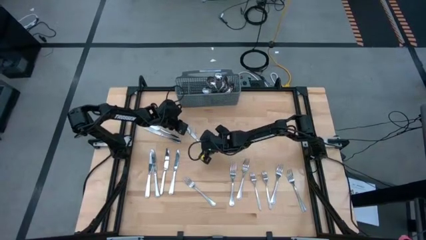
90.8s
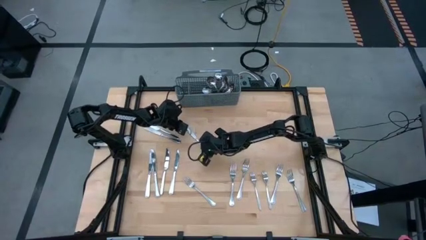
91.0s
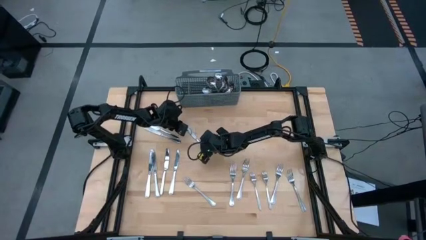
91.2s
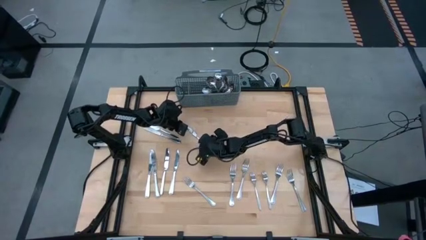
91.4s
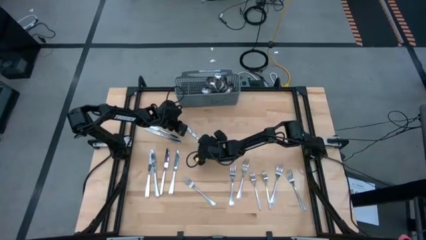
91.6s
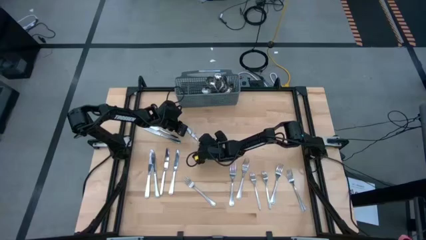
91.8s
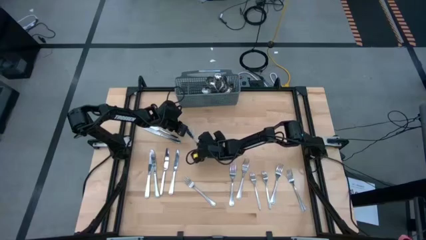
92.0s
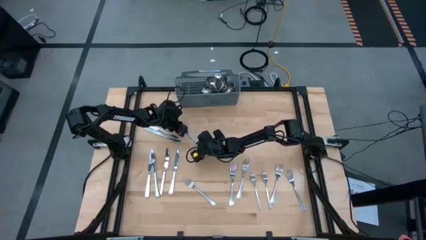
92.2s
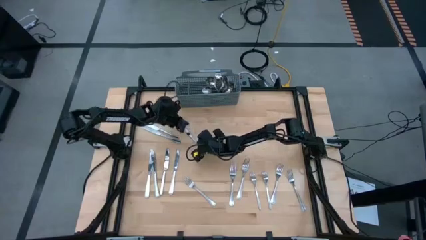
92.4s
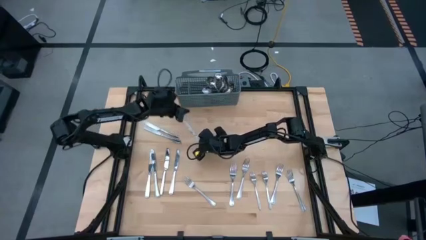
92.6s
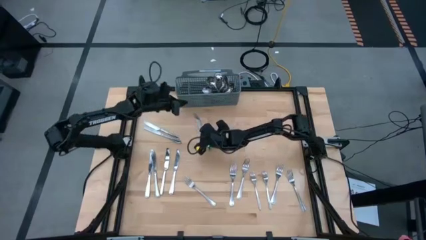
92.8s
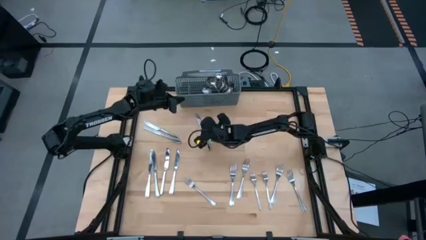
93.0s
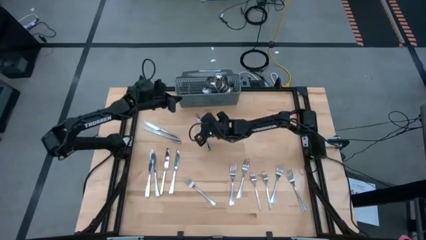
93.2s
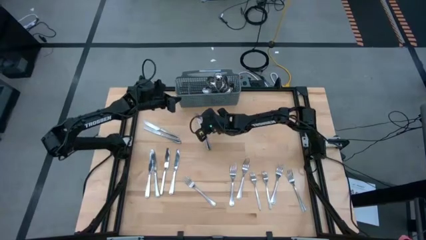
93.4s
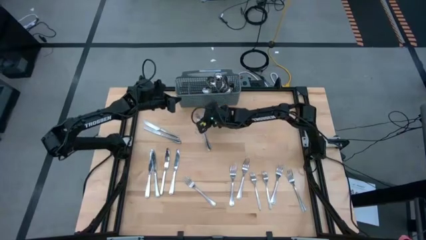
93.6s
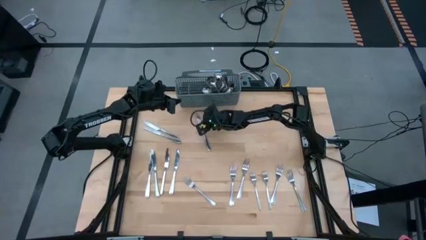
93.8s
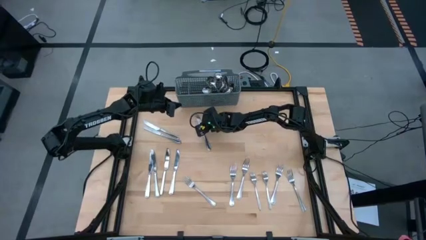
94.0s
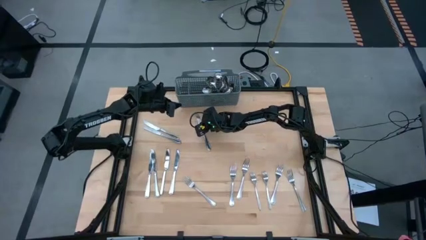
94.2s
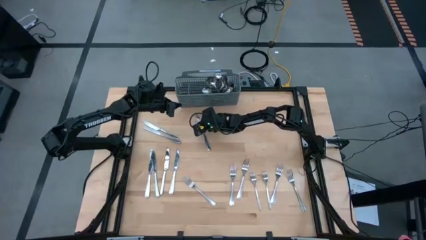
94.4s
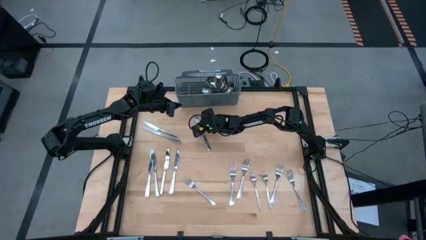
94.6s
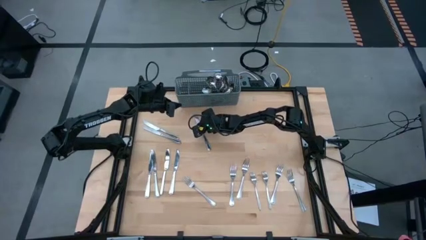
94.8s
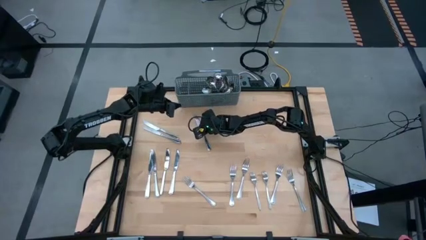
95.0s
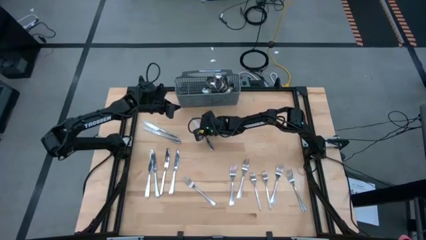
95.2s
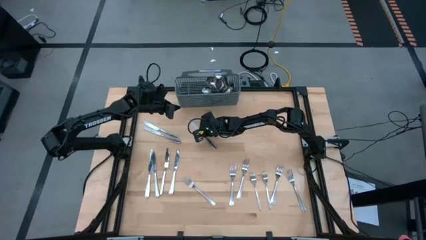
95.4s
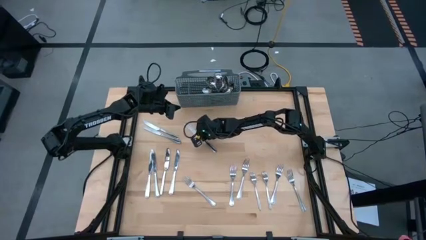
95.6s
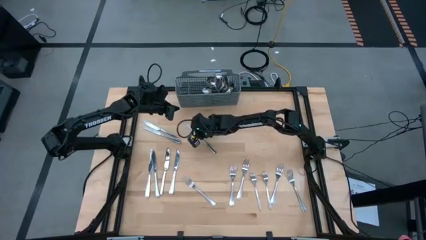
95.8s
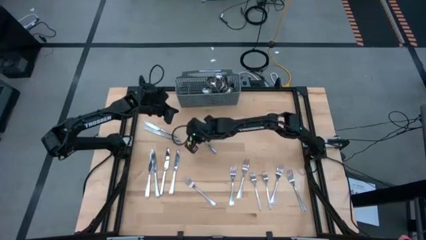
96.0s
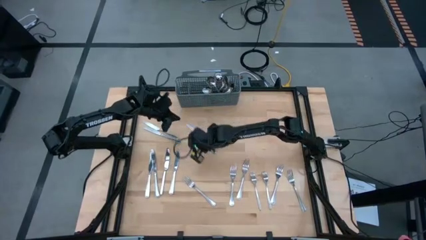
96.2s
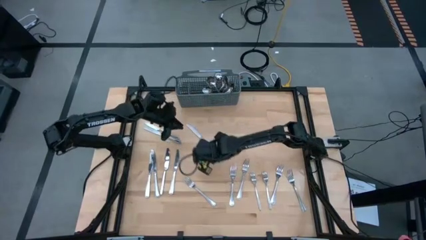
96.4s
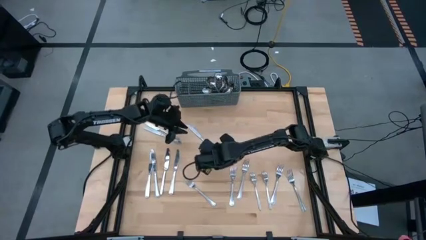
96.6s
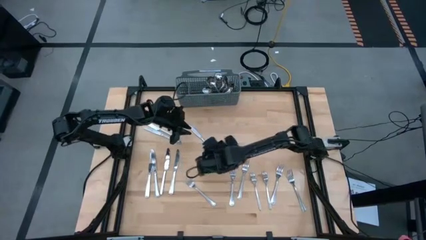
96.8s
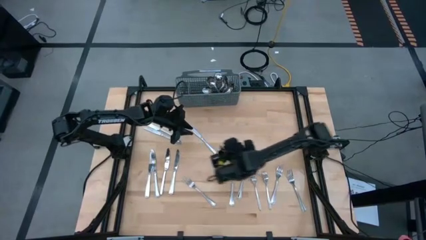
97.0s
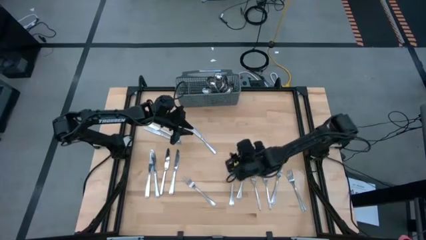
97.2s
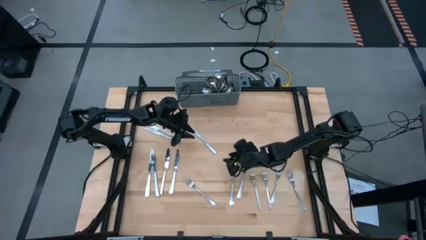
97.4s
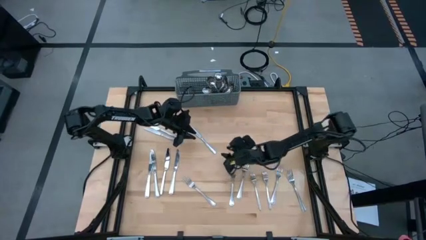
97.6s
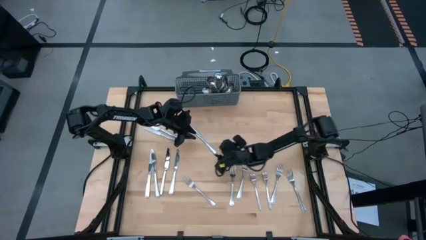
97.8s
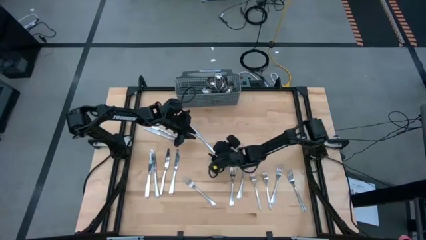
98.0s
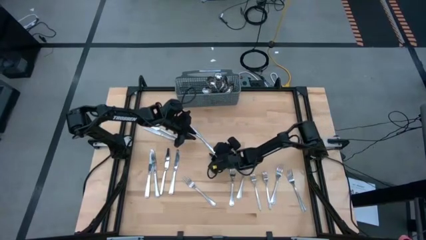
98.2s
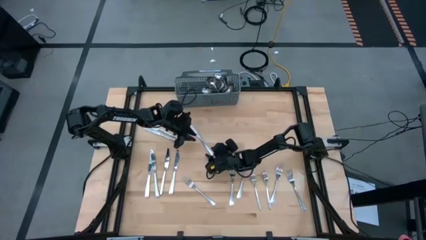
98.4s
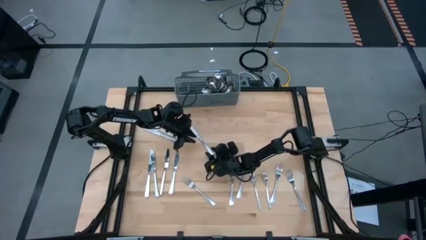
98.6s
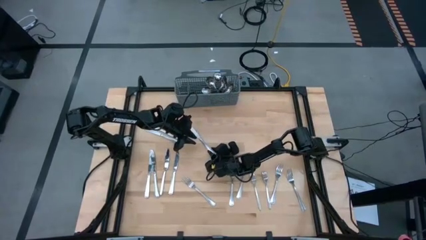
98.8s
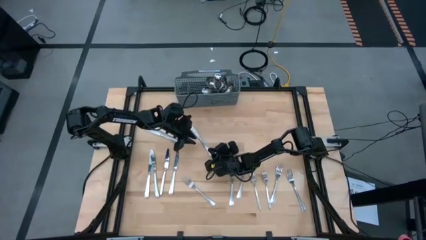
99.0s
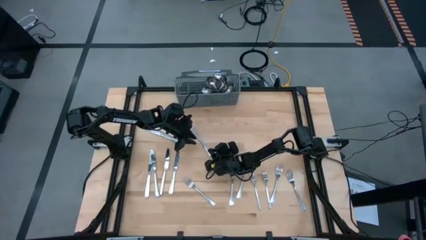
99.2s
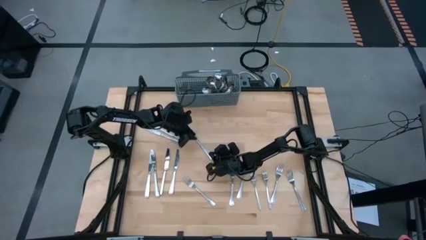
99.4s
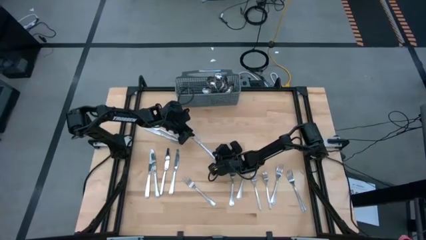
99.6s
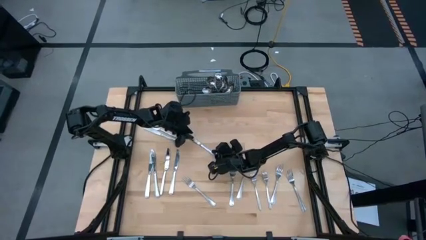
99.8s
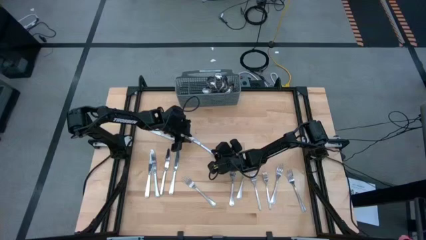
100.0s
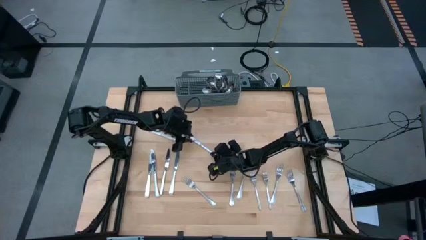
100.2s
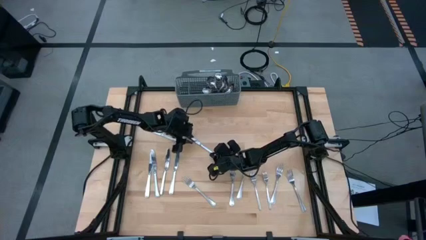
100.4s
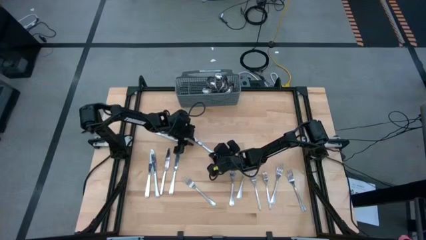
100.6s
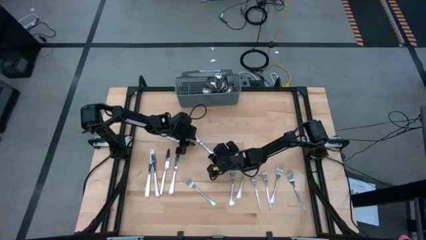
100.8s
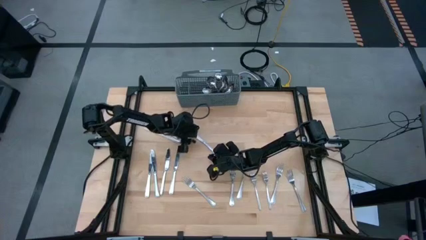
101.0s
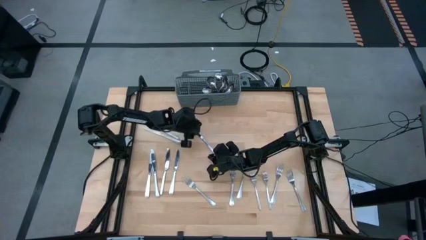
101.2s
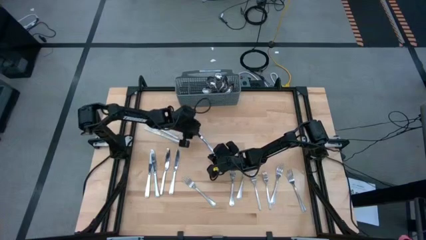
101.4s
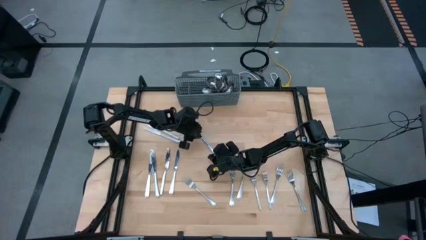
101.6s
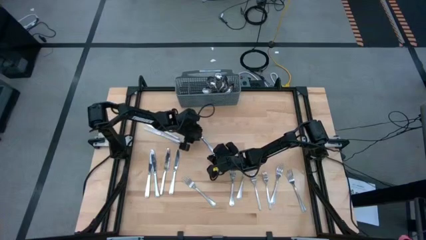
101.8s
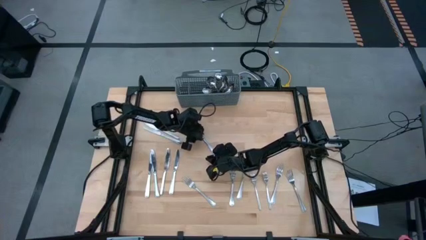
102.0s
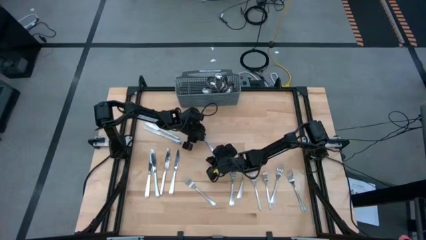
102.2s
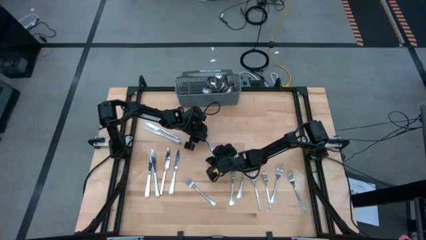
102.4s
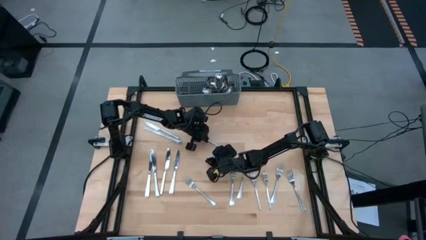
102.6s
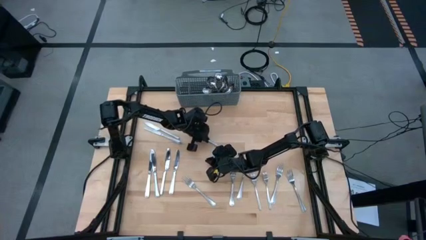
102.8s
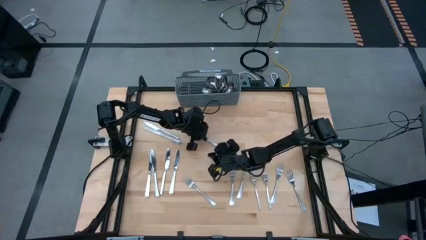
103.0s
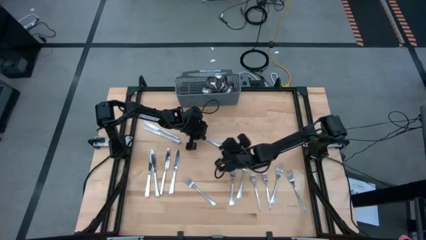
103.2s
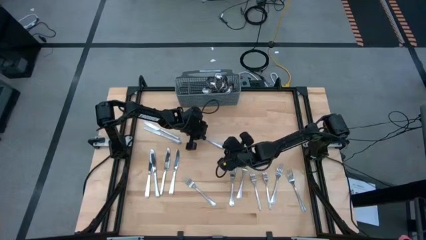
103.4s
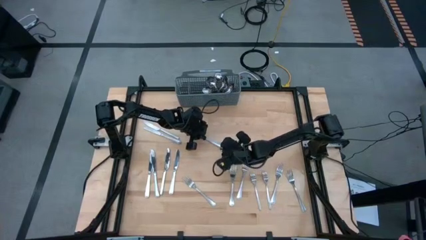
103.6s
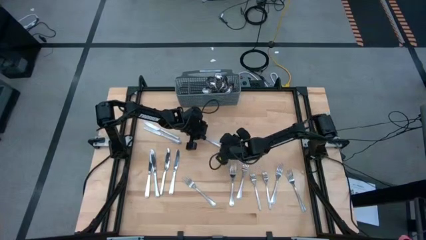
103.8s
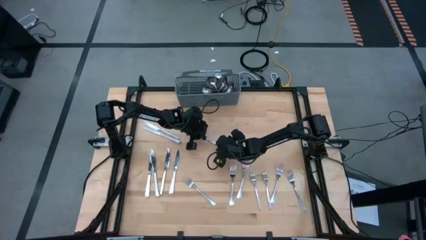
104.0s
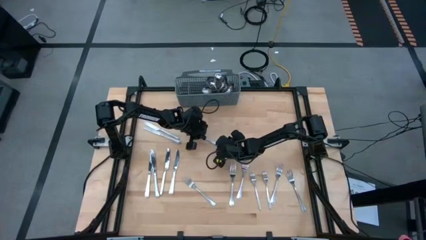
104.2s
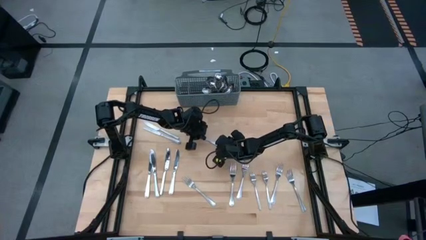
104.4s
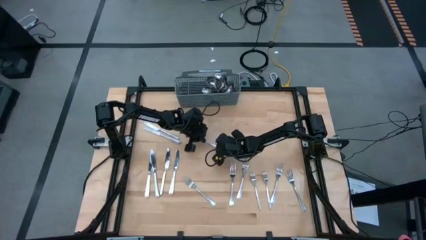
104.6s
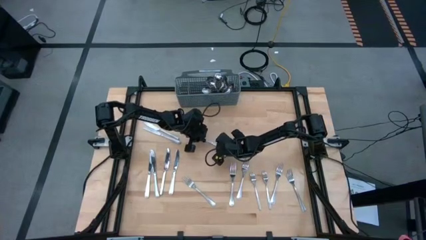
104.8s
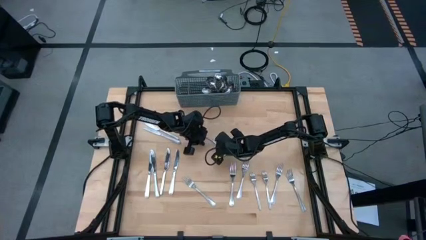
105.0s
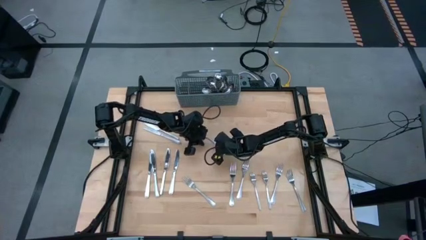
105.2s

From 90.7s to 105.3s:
Task: Sort silverware
Put the silver knife into the gray utensil holder

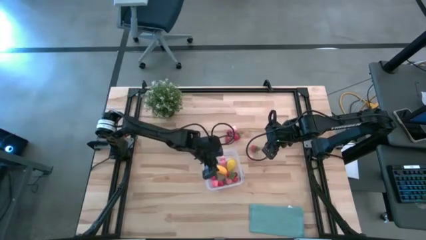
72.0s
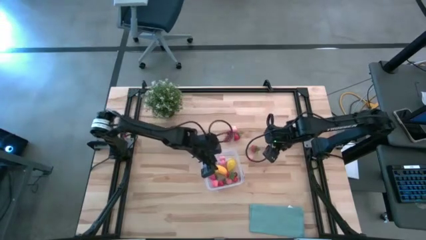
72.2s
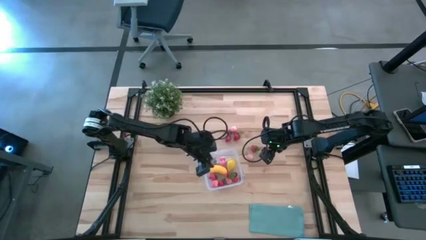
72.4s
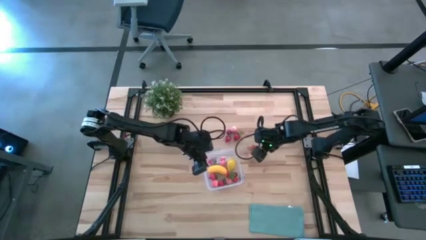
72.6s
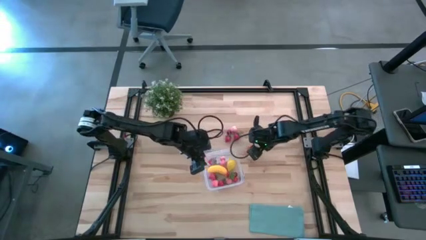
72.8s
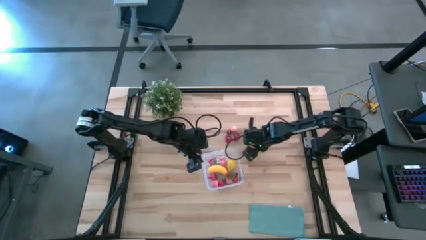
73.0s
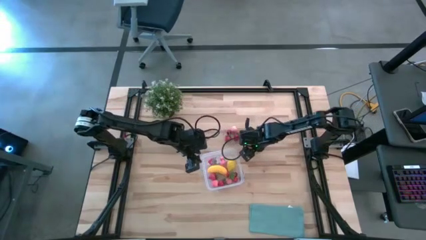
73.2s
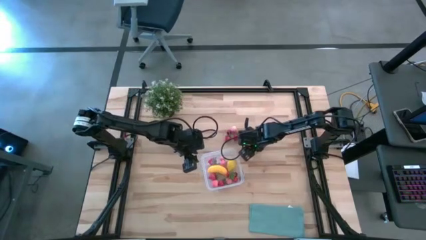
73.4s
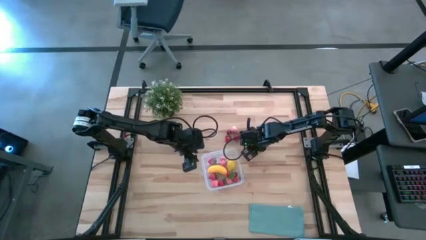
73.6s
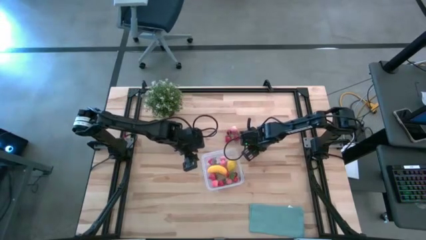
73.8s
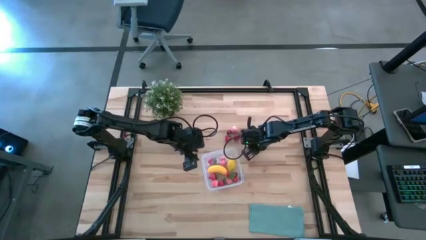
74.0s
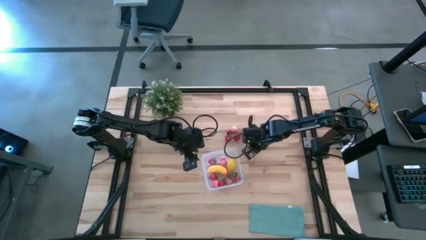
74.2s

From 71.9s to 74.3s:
Task: Pick and placing Produce into tupperware
Put the red strawberry into the transparent container
